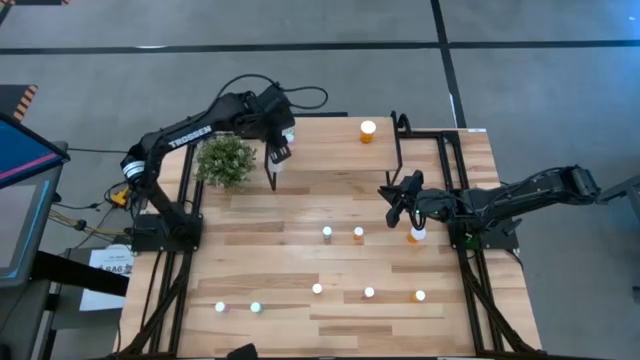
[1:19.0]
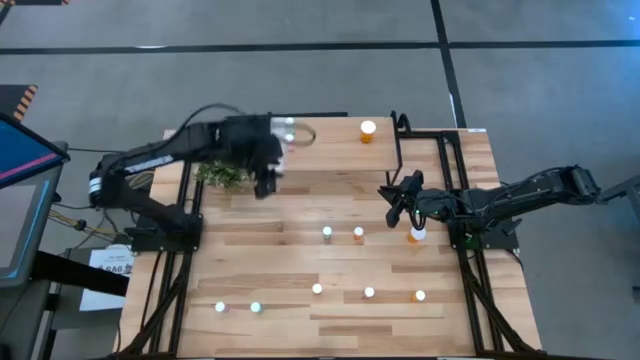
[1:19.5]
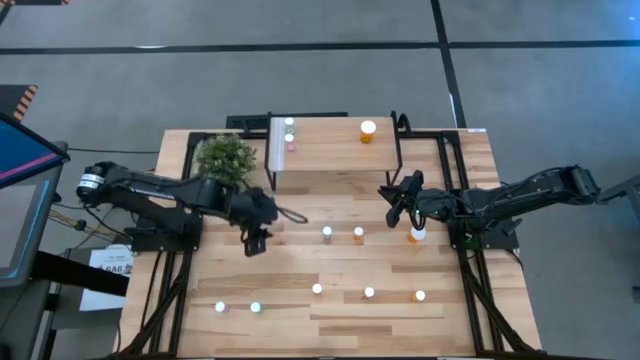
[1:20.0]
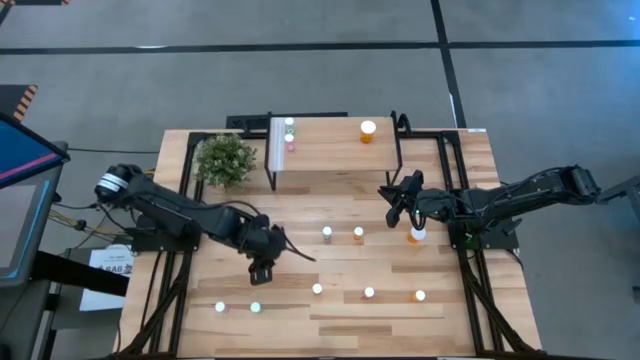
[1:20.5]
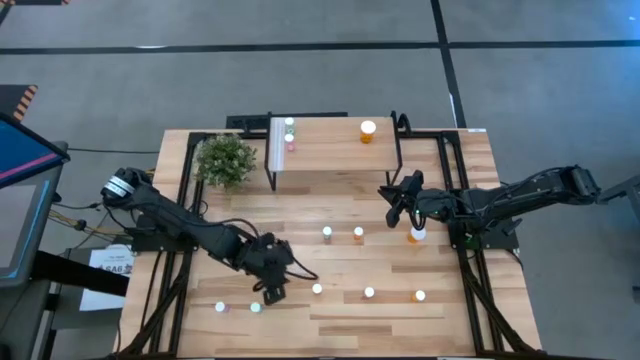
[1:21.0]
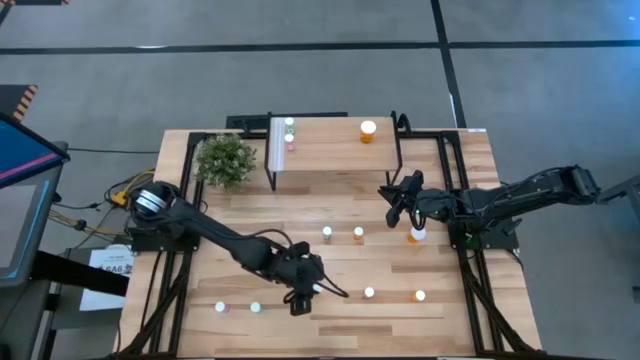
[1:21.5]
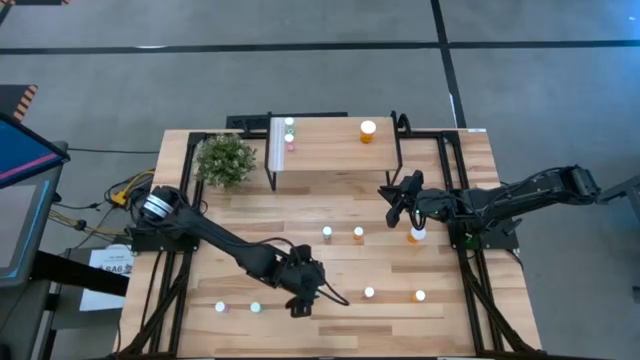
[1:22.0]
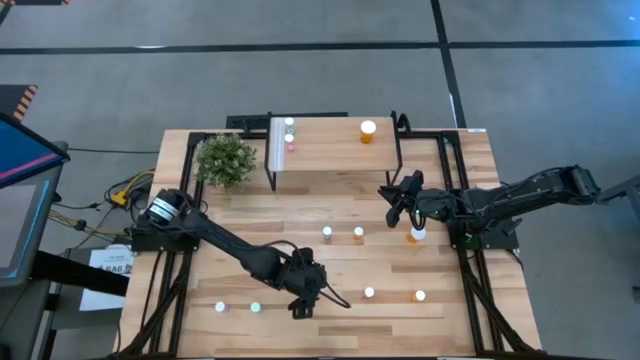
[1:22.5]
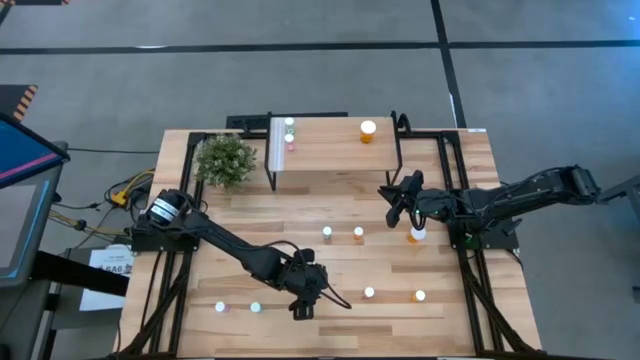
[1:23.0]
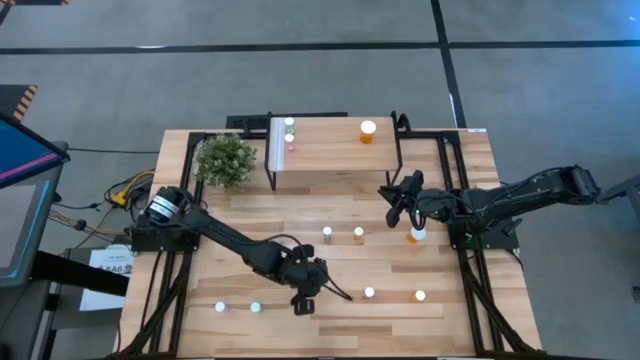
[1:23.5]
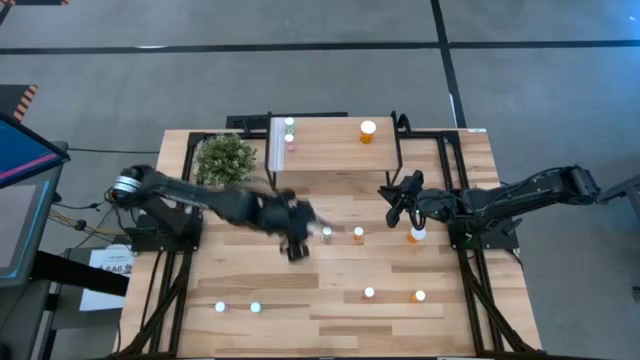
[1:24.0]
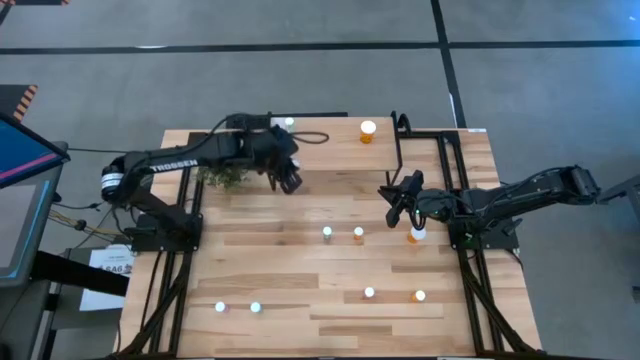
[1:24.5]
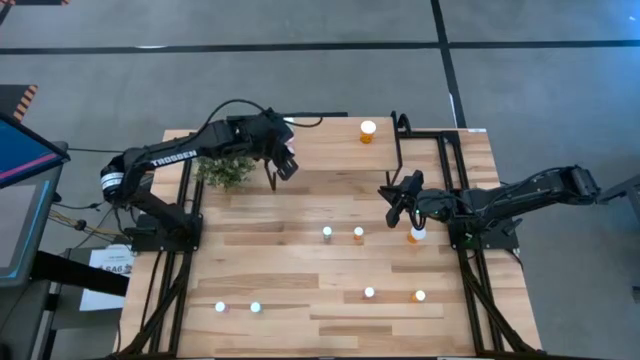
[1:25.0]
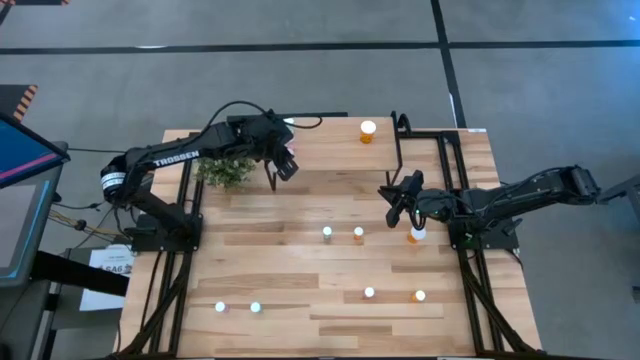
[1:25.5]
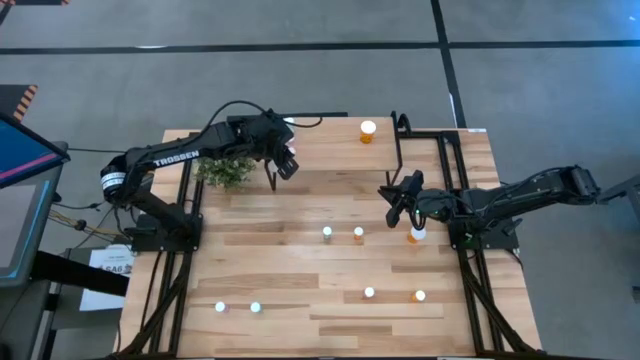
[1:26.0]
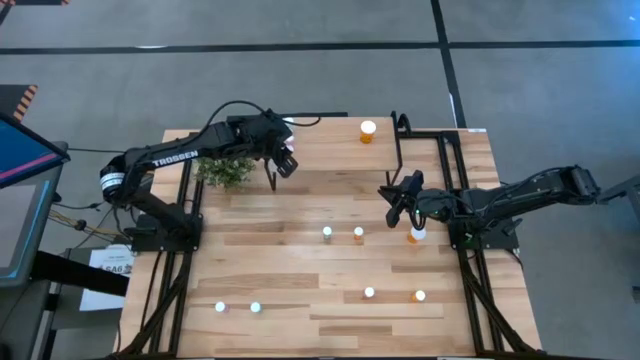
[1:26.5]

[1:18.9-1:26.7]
Task: Pick and place medicine bottles onto shelf by color
Put the left orange small pill bottle on the shelf

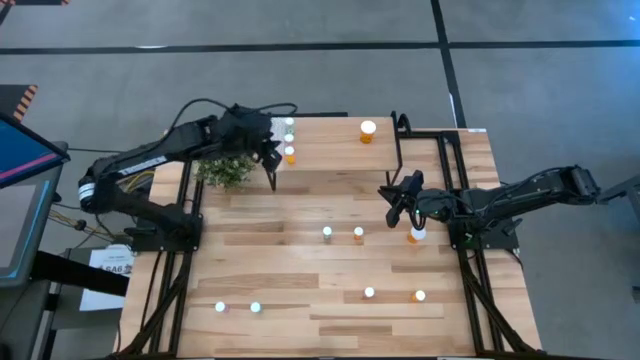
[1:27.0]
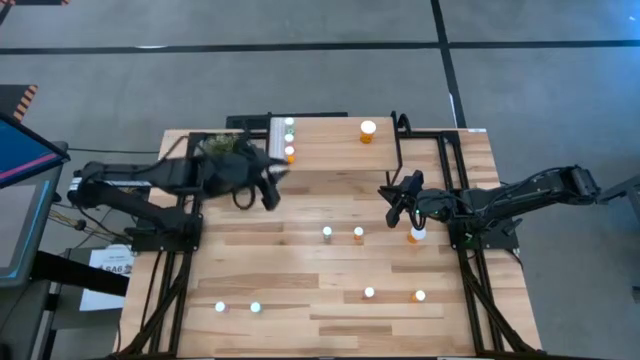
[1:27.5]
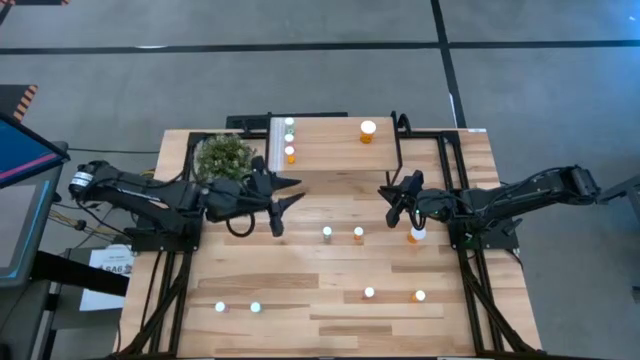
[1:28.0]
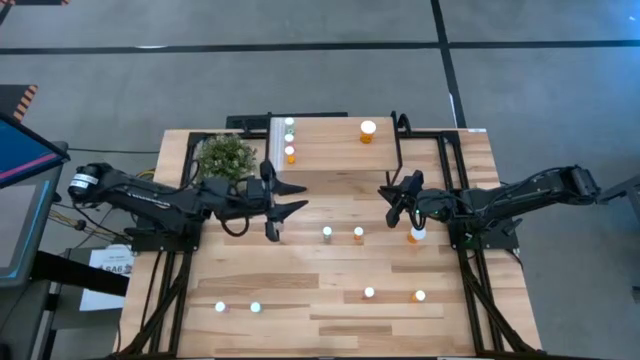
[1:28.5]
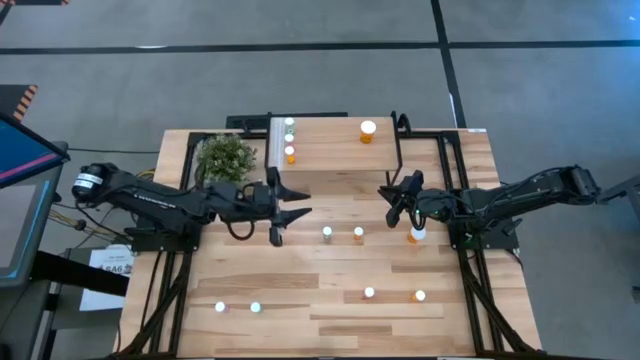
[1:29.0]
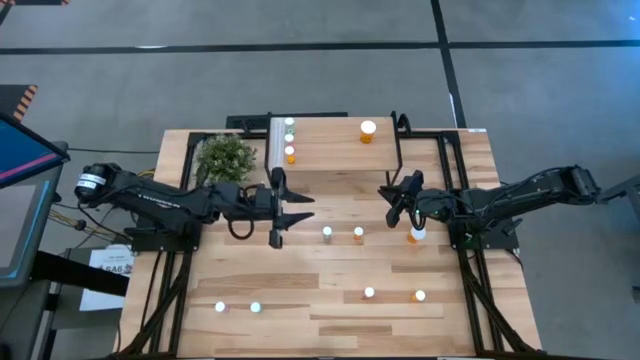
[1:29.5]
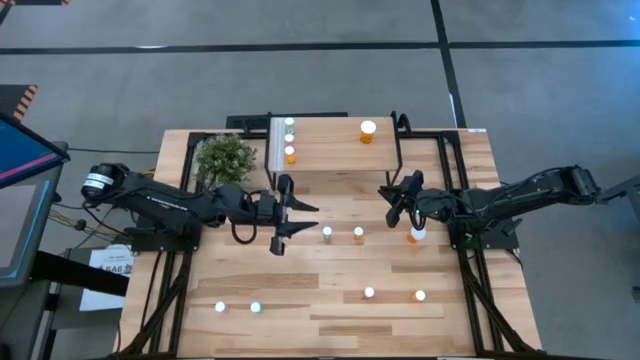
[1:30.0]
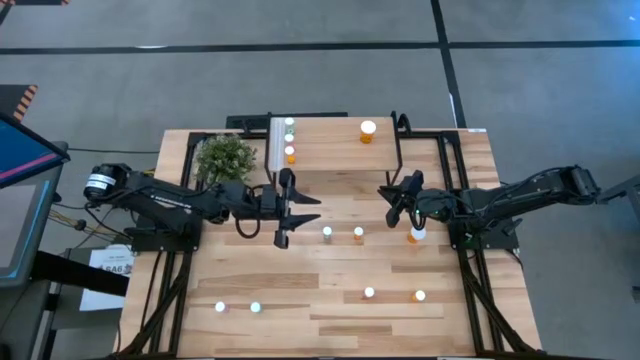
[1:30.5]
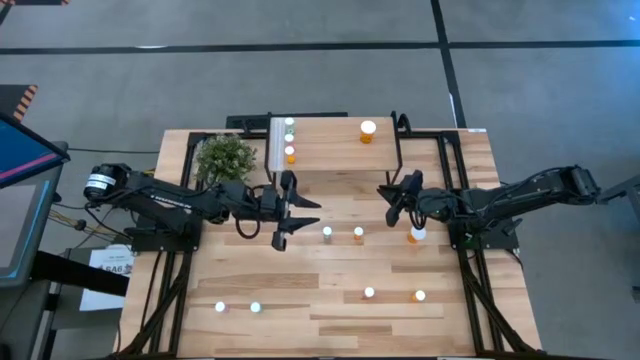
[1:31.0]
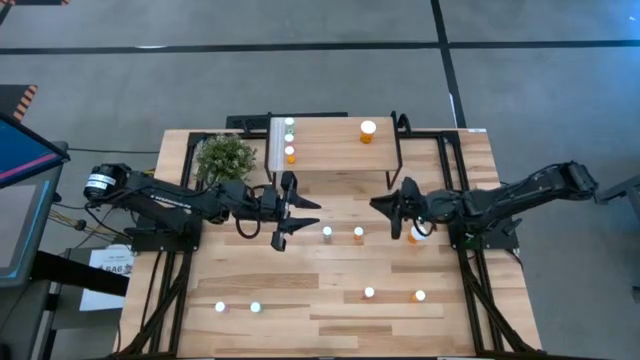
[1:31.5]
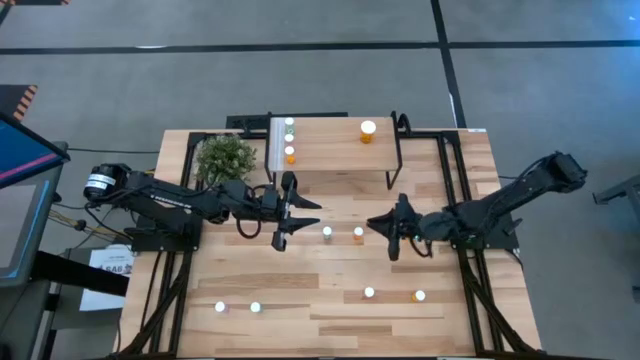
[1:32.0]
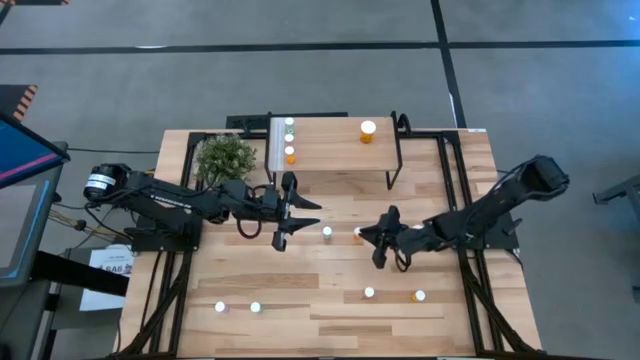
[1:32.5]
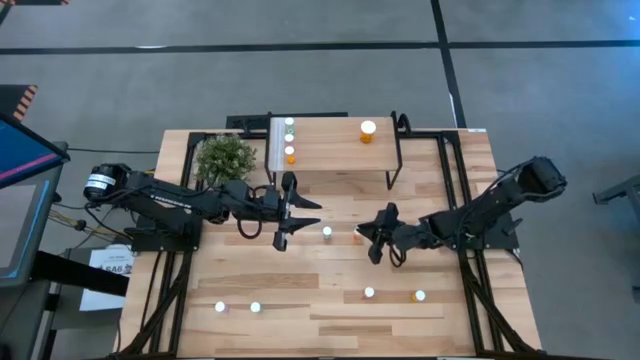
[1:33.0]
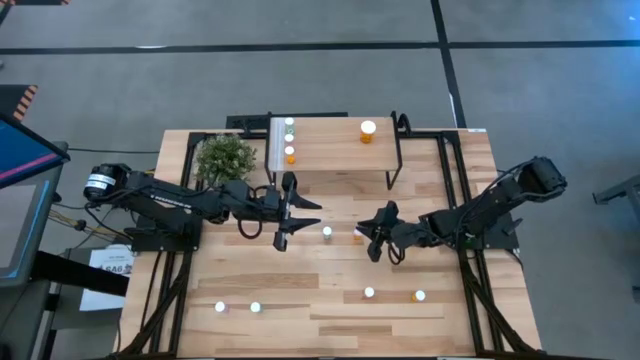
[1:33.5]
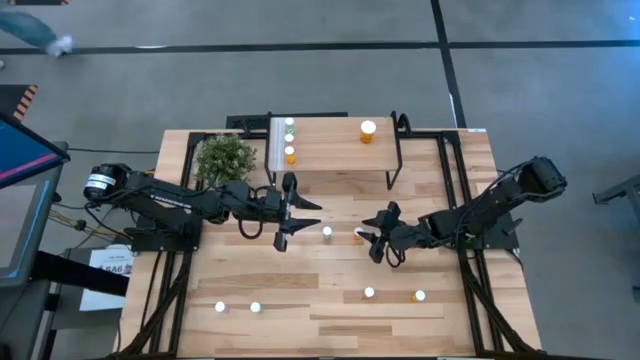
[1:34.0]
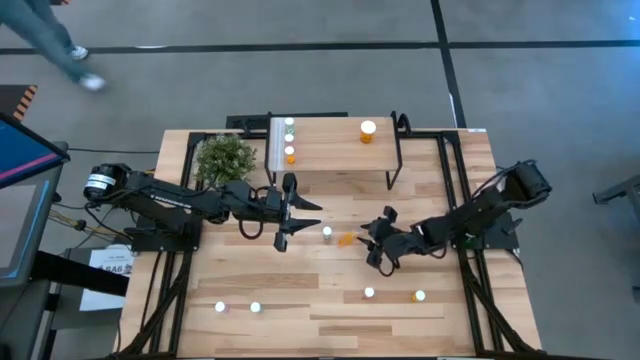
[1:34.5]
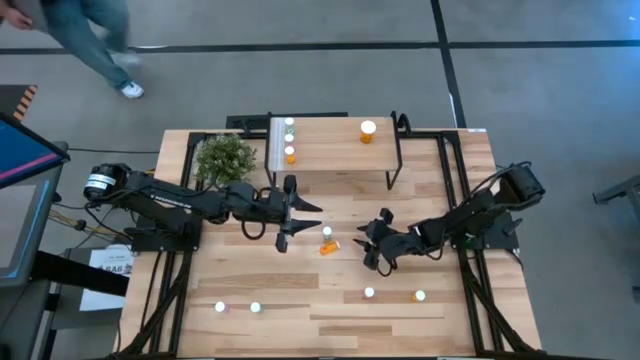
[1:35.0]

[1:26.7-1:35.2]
Put the top left orange small pill bottle on the shelf

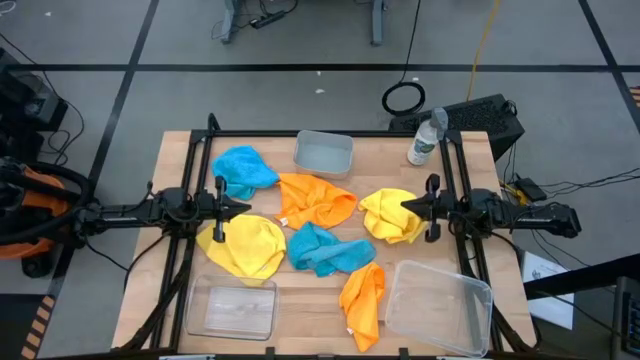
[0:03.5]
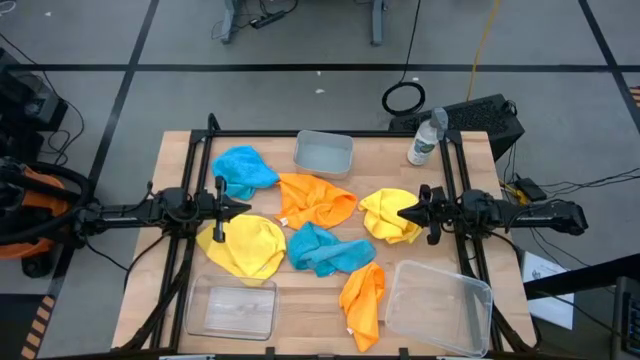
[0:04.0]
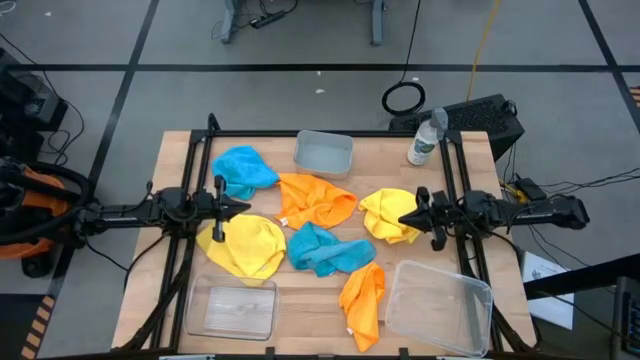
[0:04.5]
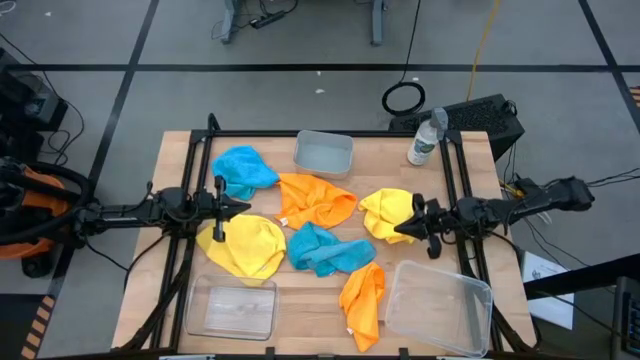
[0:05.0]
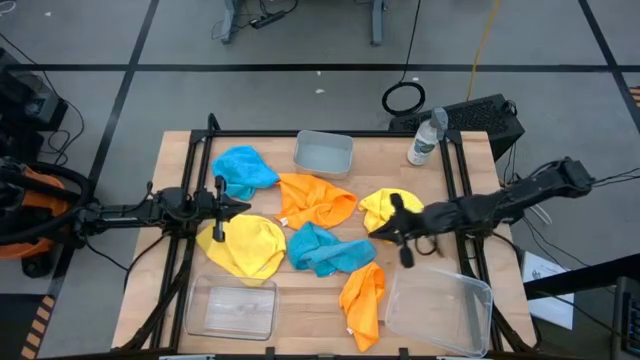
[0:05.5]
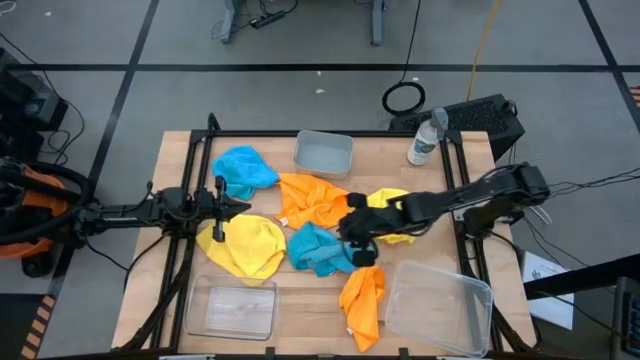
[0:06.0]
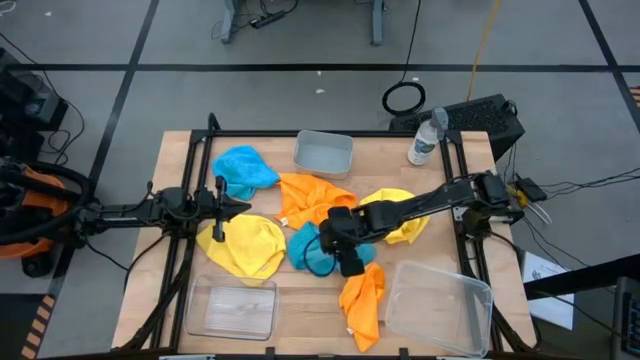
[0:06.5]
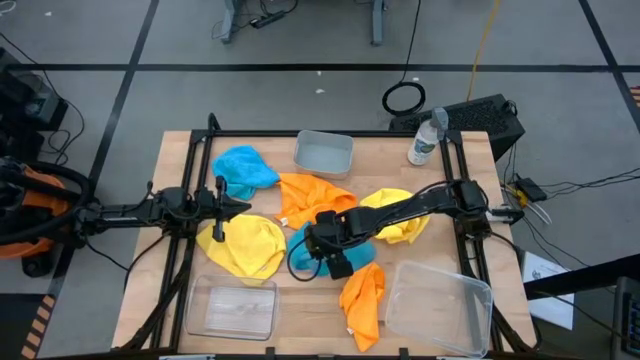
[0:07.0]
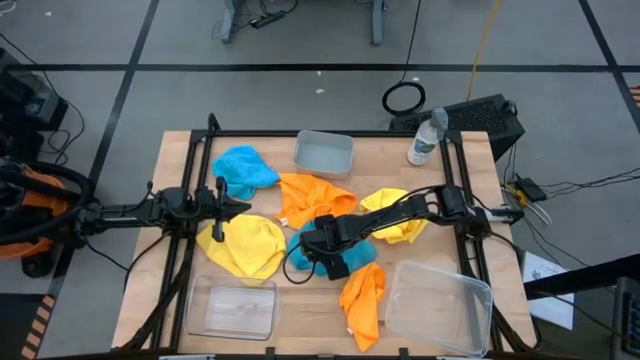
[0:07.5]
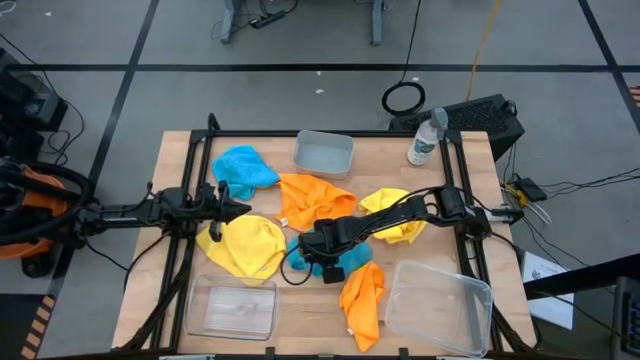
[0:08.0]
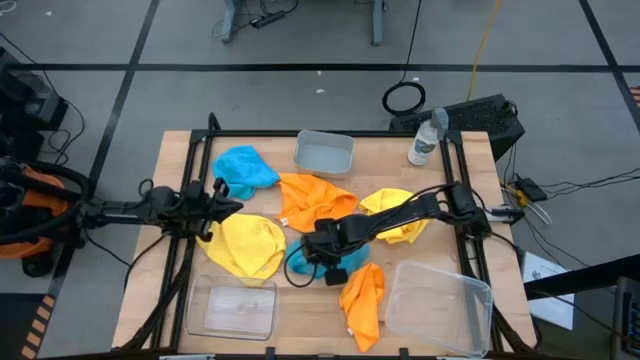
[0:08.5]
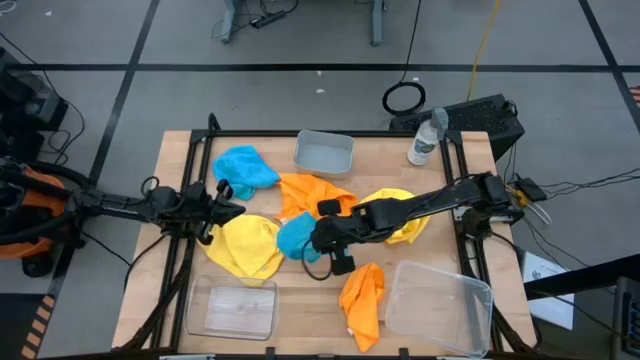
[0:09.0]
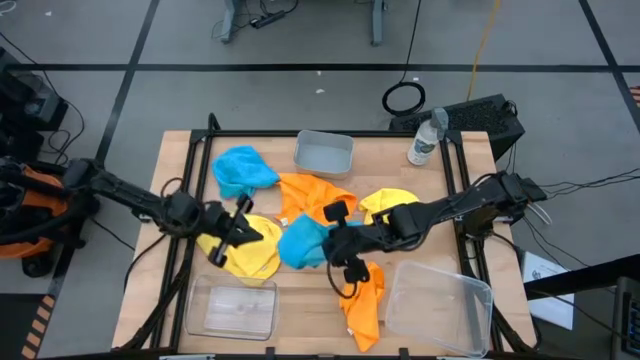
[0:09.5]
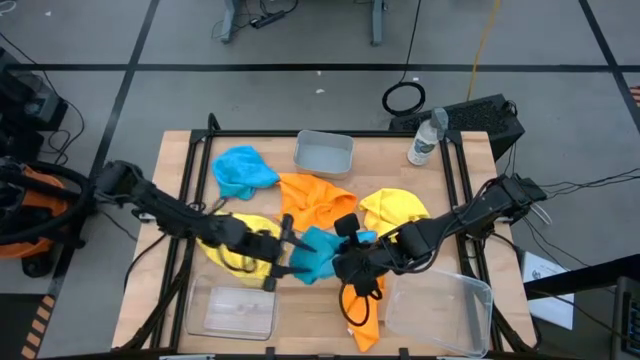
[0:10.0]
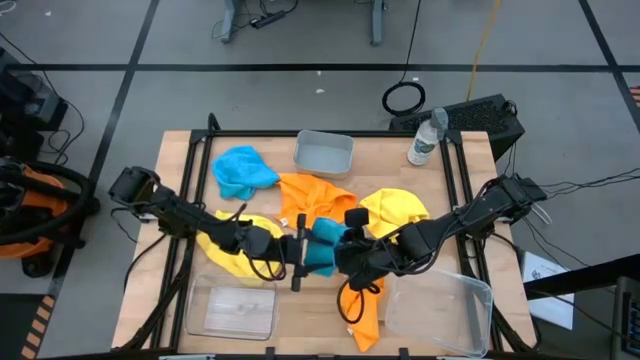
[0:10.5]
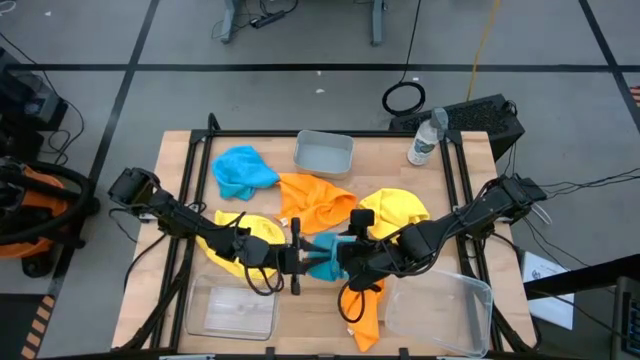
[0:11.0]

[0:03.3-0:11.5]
Task: Sort microfiber towel by color & place in baskets
Put the bottom blue microfiber cloth into the right transparent bin
